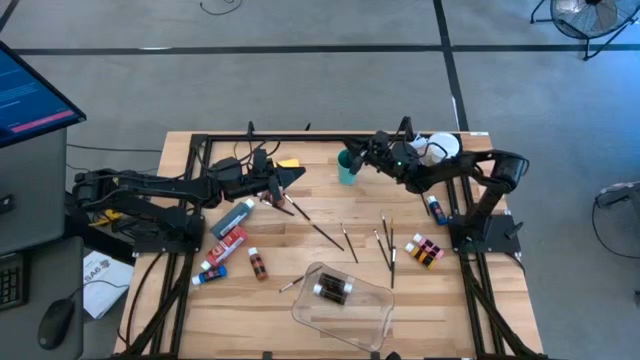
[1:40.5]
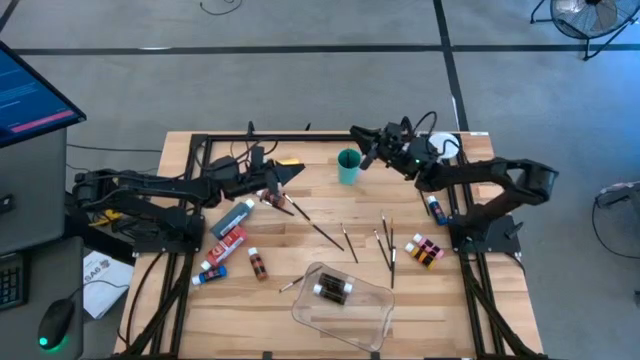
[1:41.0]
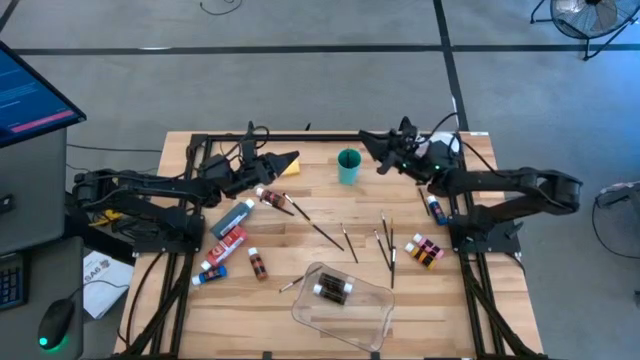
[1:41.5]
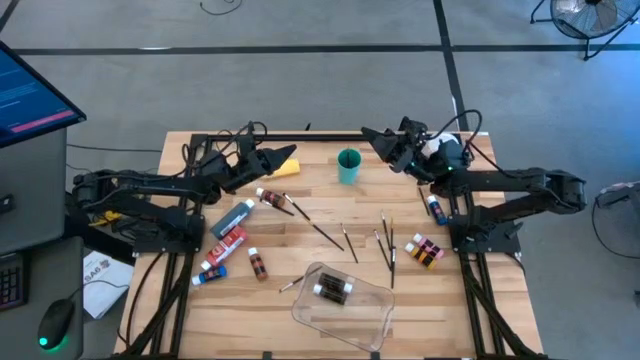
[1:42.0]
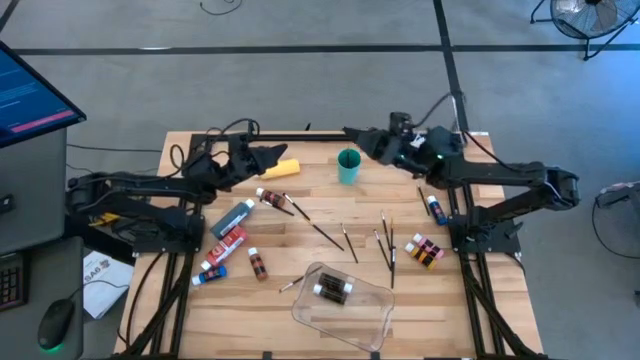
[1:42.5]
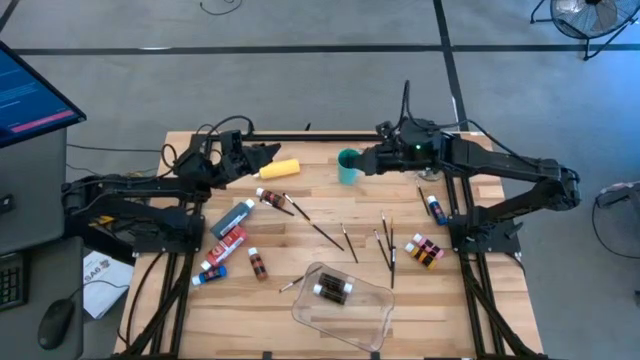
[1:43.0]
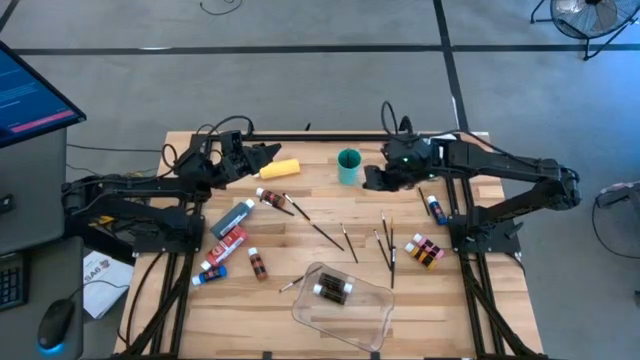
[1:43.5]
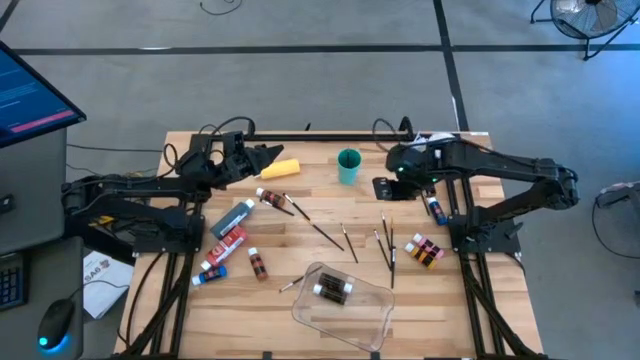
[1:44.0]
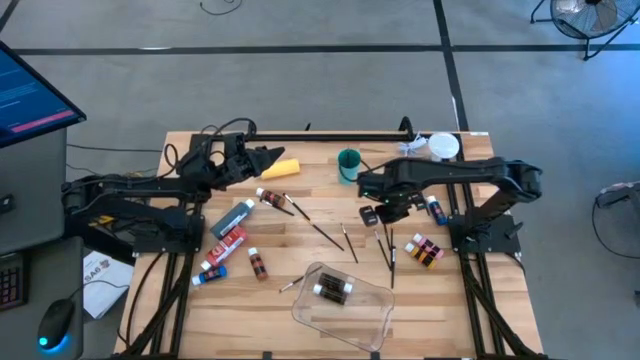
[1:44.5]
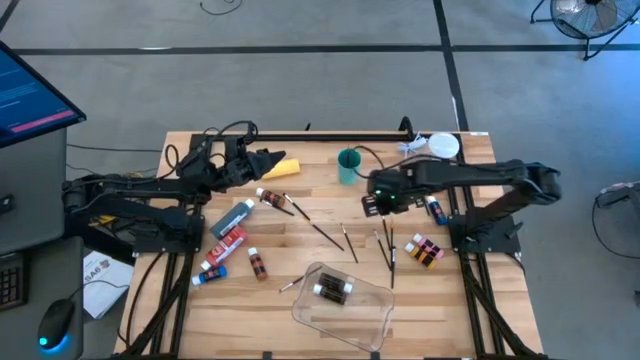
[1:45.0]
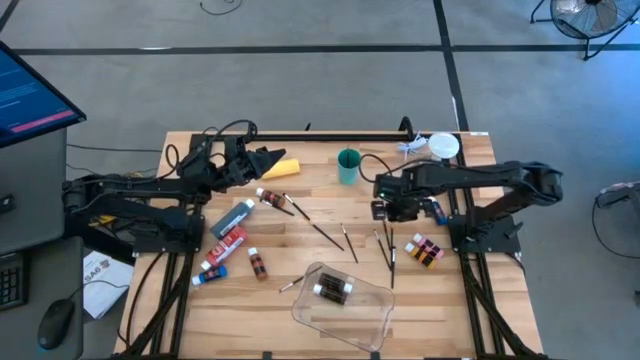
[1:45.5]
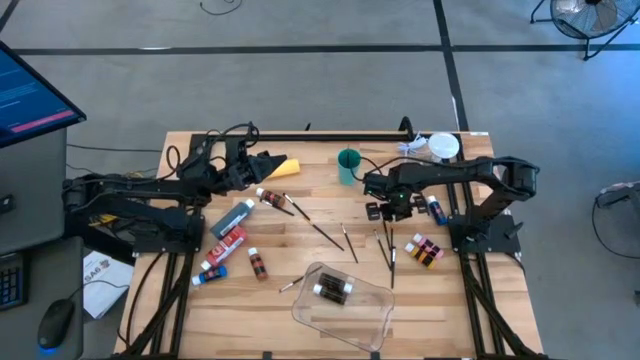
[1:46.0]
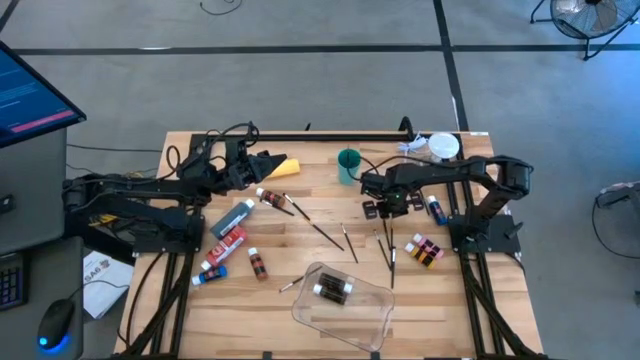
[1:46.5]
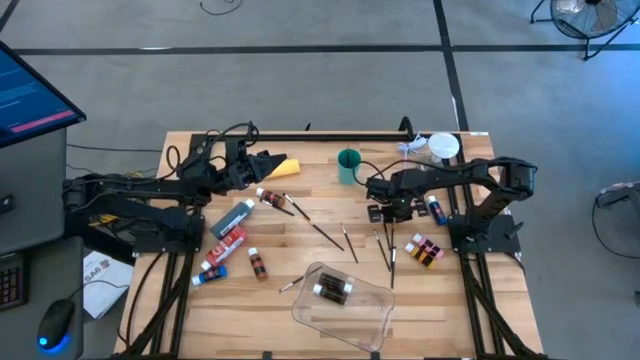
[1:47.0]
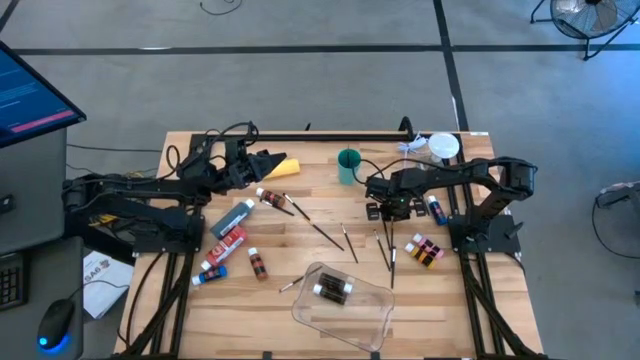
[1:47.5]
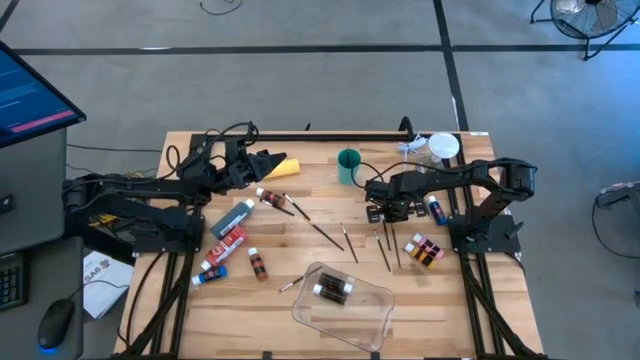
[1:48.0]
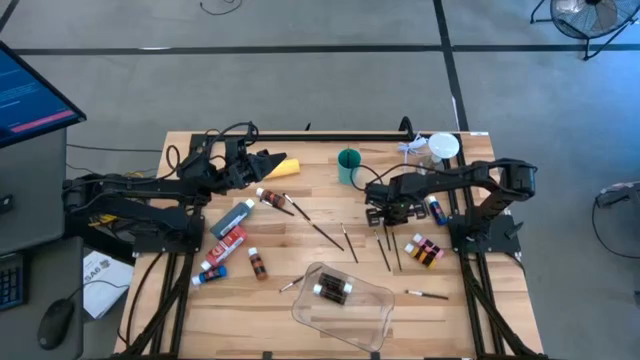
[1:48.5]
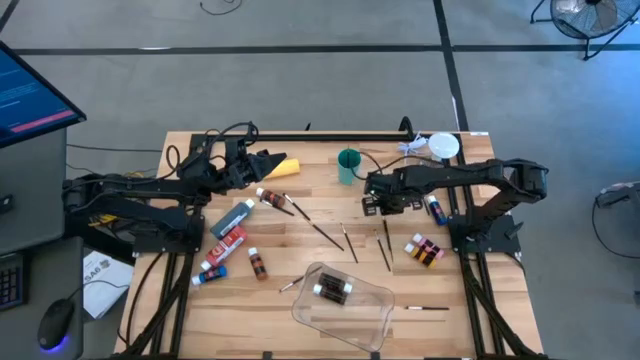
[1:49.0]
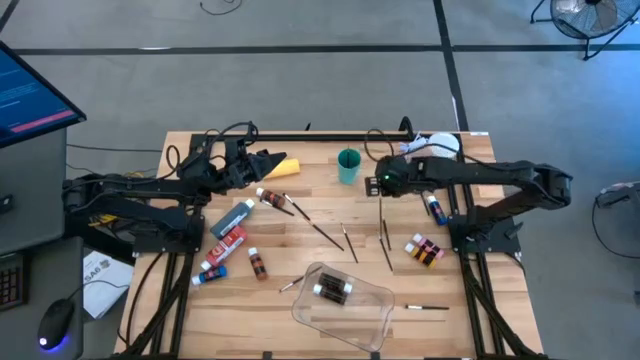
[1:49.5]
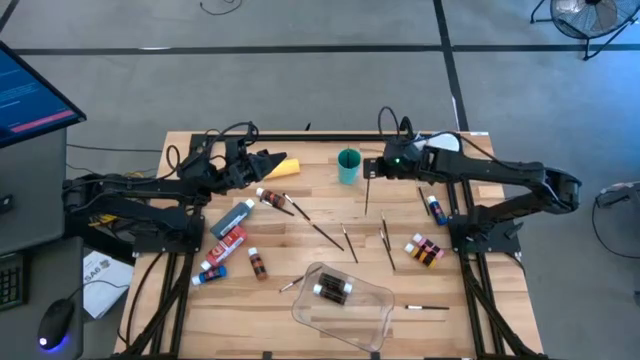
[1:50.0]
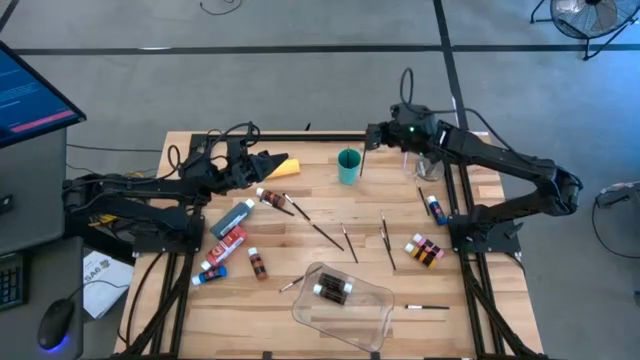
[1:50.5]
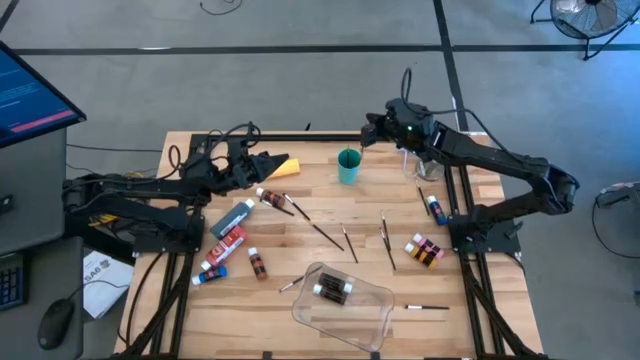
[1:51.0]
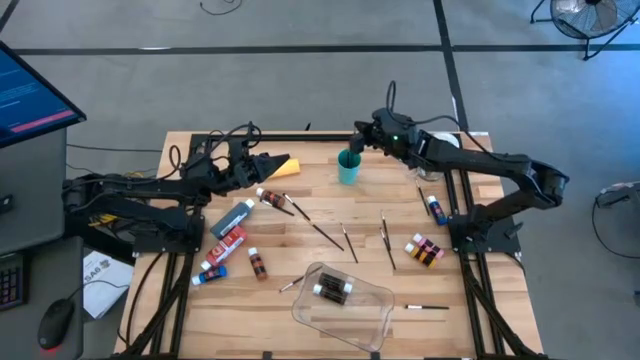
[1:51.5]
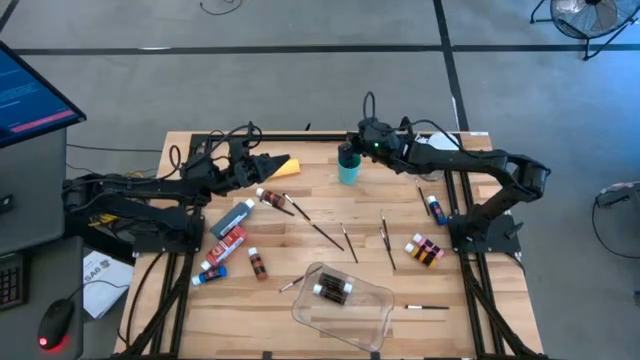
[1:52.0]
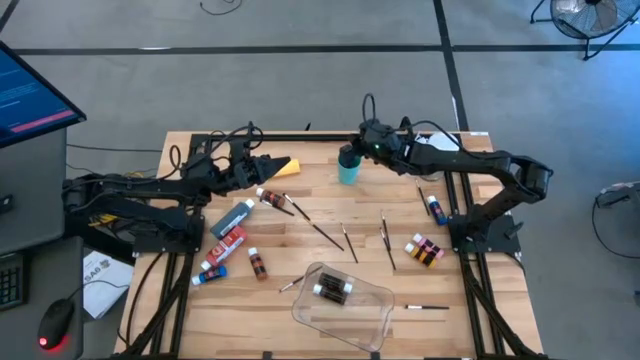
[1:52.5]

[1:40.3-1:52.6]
Task: Pick & Place Paint Supplies
Put the gold paint brush into the green cup

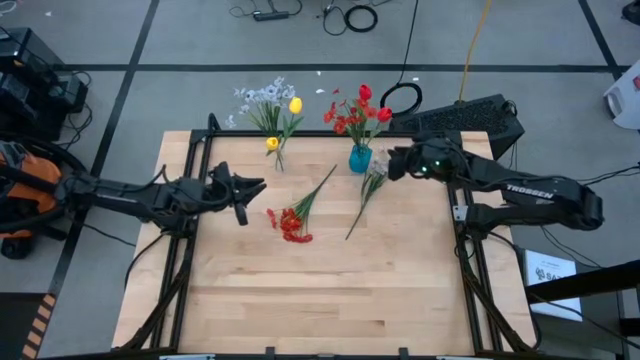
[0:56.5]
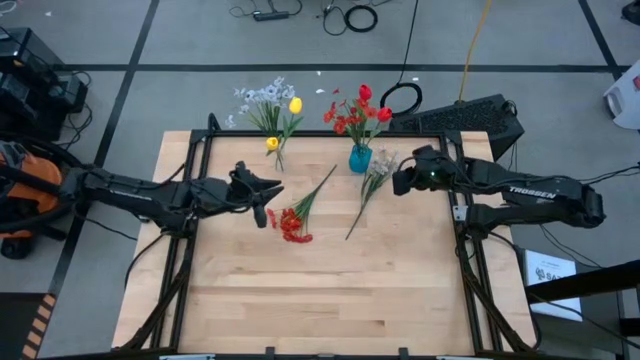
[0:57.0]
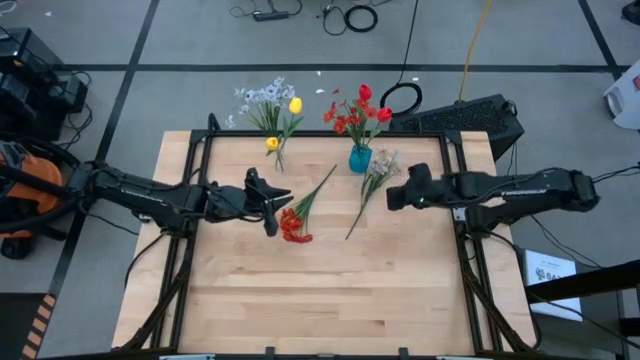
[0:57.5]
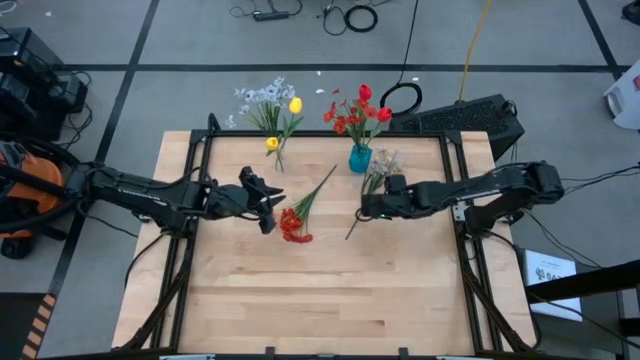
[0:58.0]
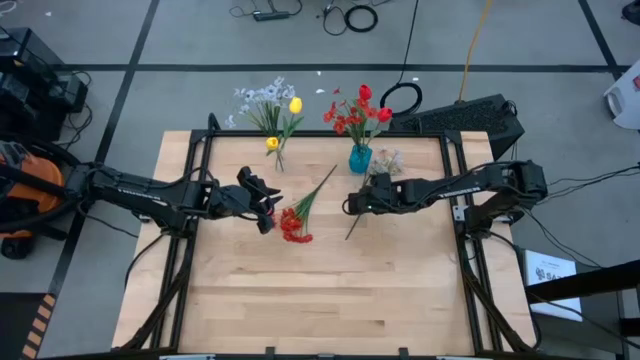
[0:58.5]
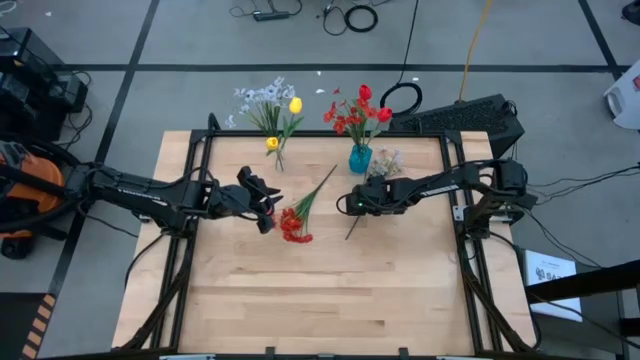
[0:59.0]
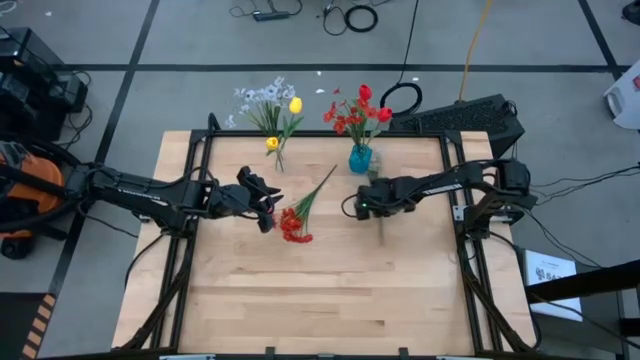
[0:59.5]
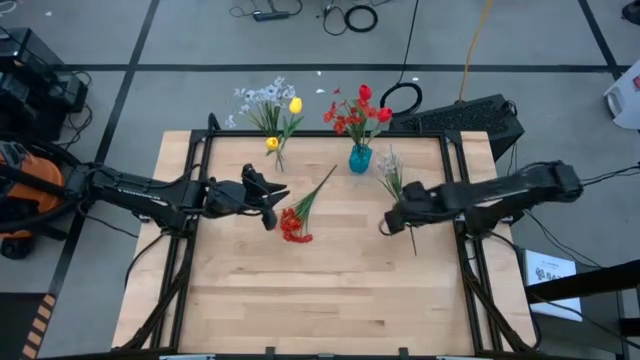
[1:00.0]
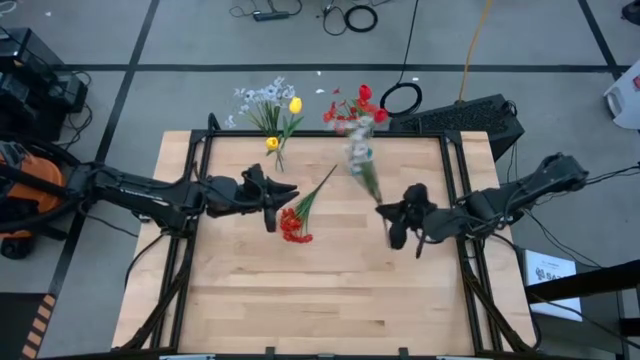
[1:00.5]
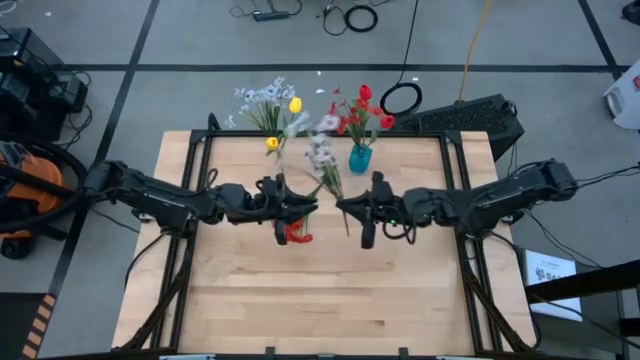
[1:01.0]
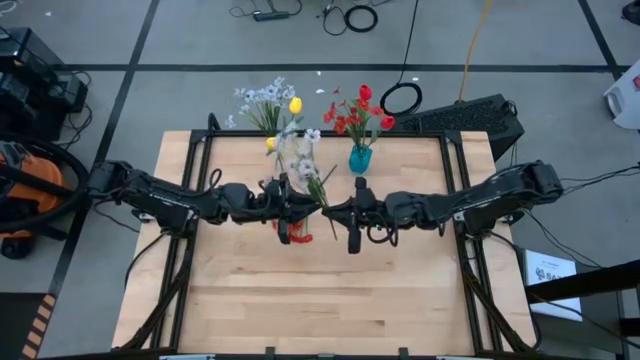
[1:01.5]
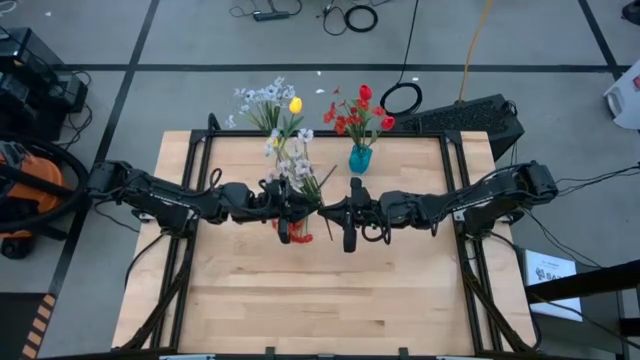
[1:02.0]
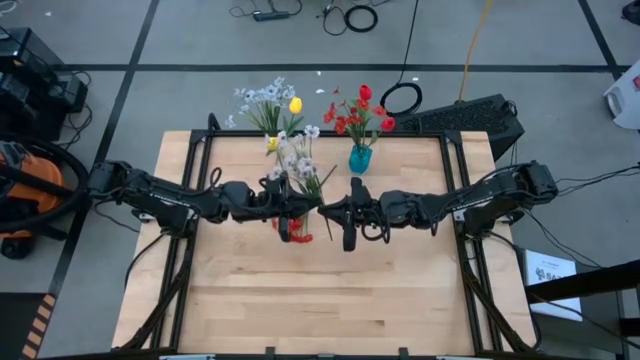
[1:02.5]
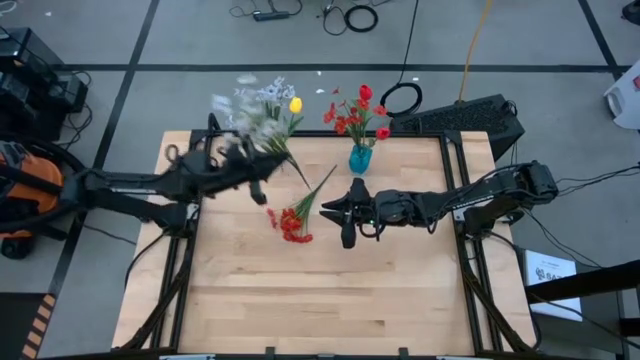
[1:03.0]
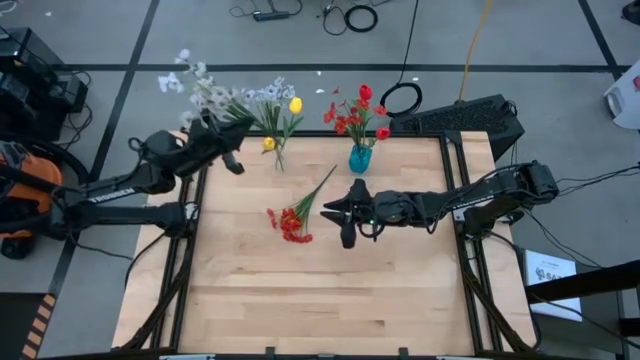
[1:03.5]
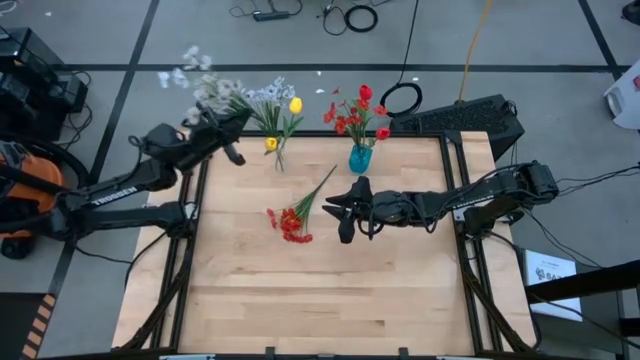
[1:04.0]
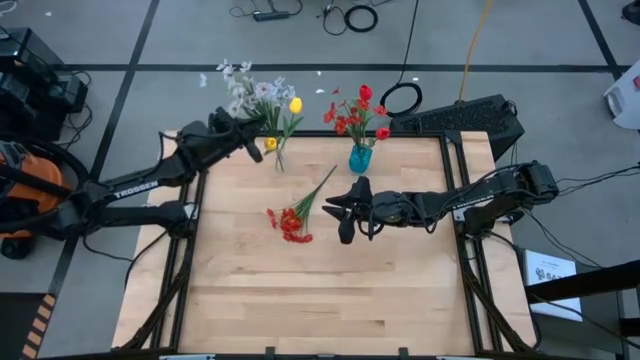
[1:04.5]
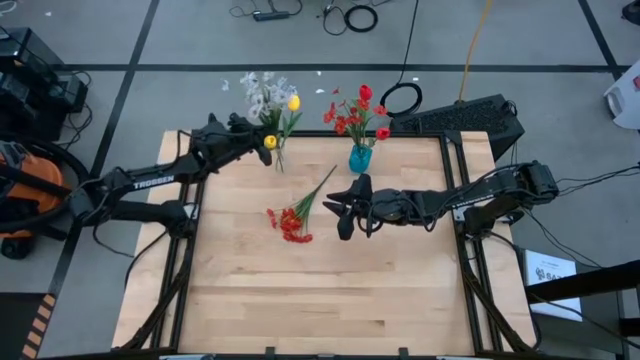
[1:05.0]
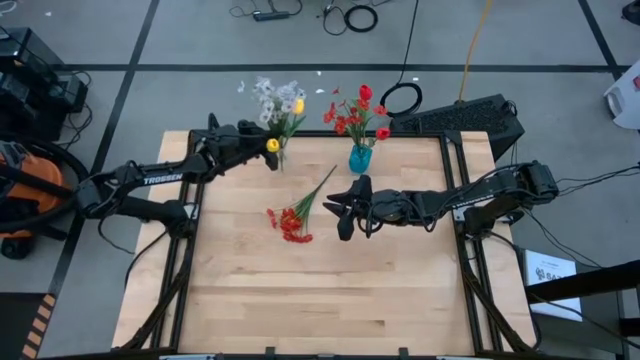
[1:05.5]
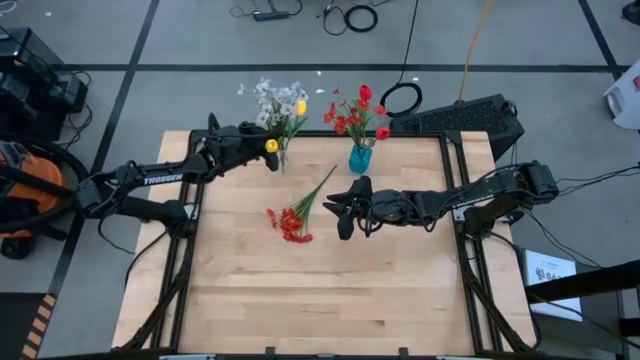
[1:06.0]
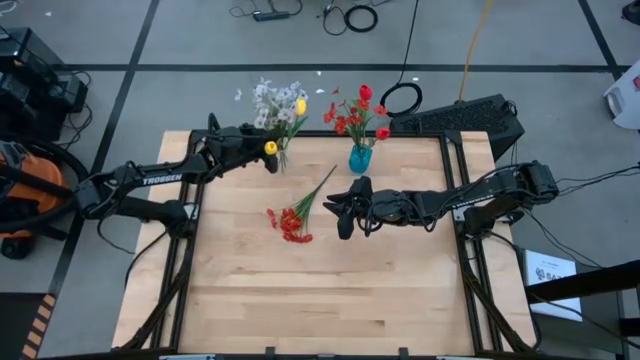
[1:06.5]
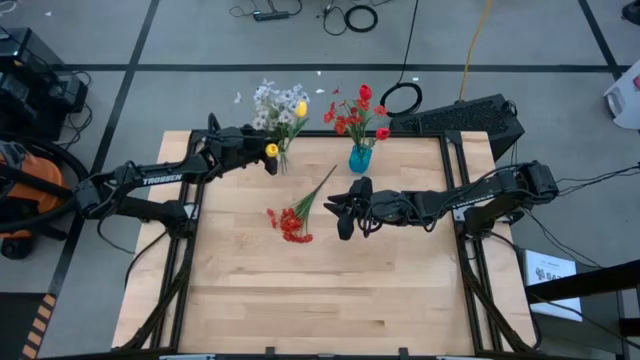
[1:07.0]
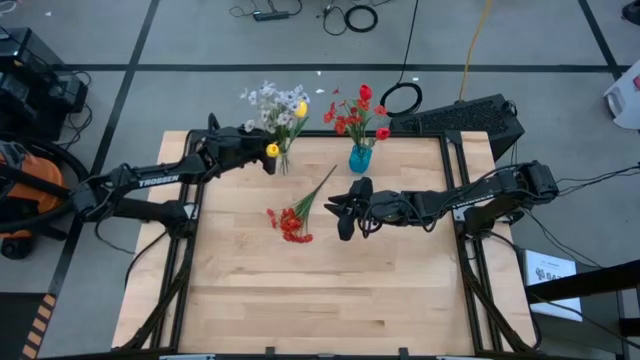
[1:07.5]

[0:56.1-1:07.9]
Task: Sort flowers into vase by color
Put the white flower into the transparent vase
